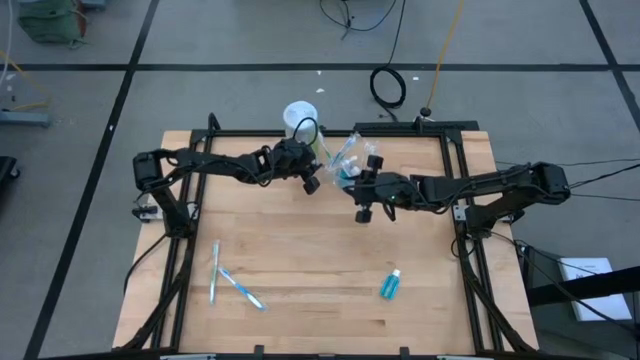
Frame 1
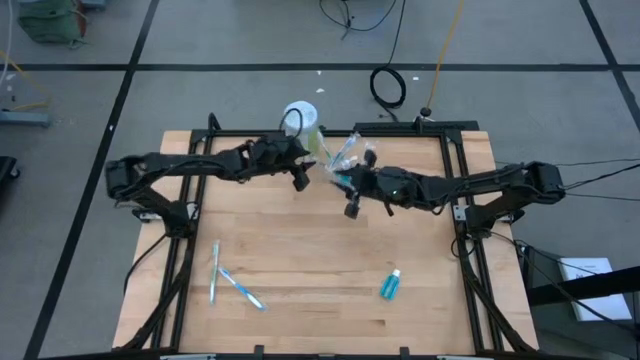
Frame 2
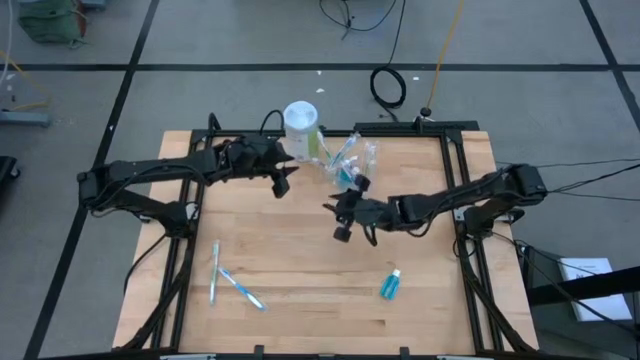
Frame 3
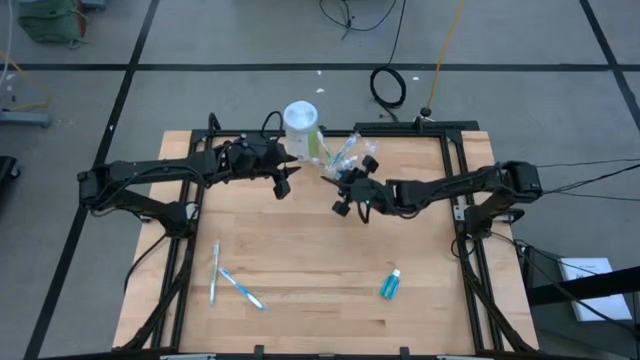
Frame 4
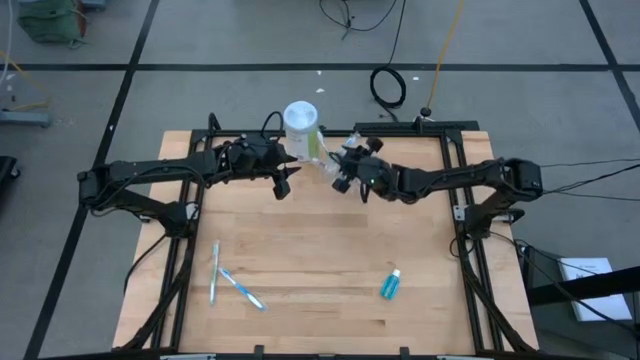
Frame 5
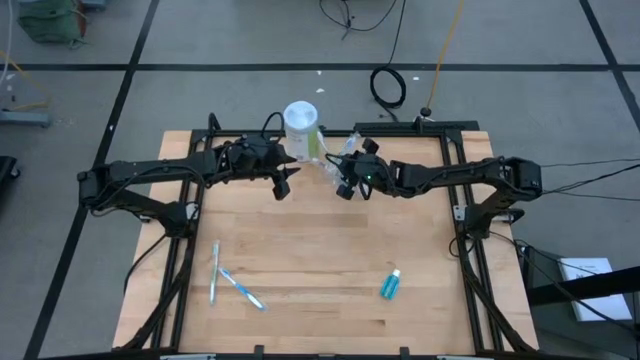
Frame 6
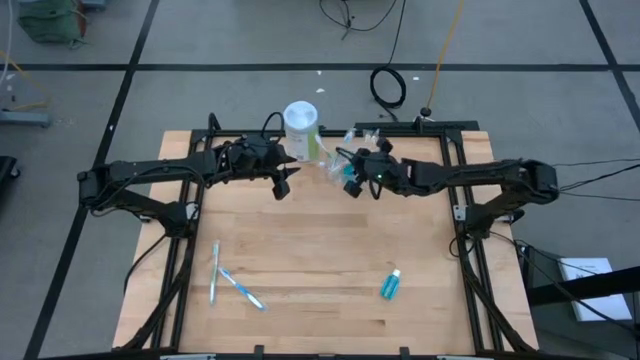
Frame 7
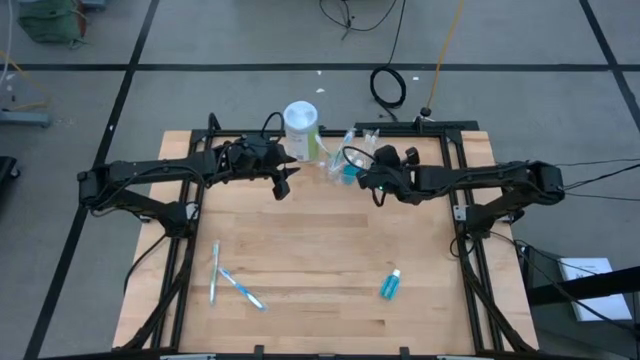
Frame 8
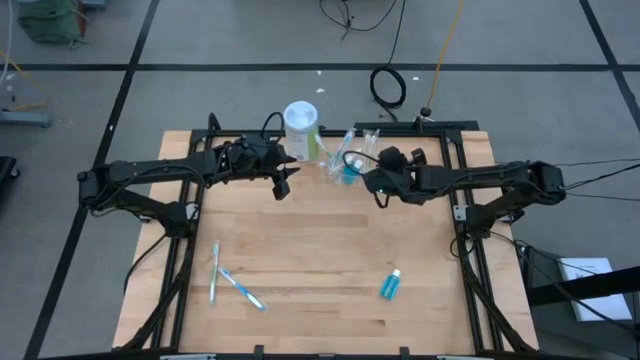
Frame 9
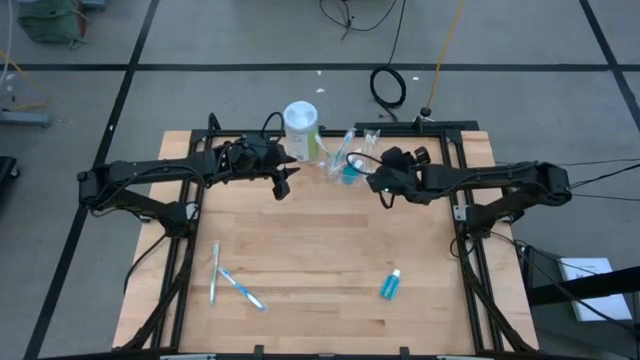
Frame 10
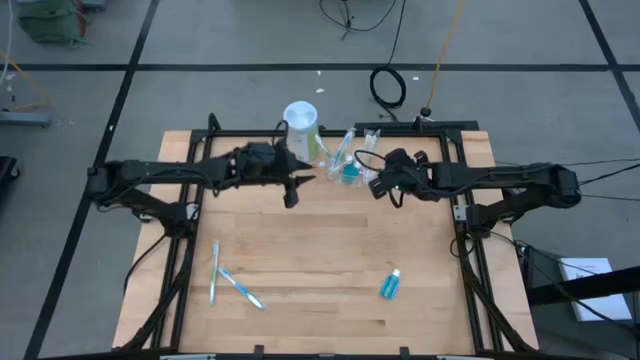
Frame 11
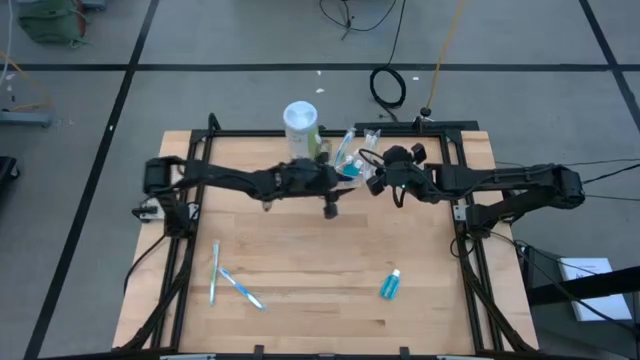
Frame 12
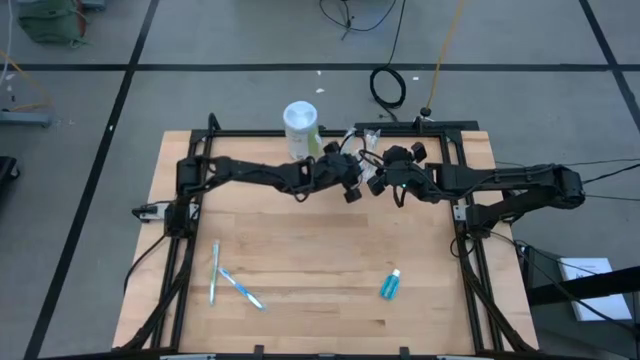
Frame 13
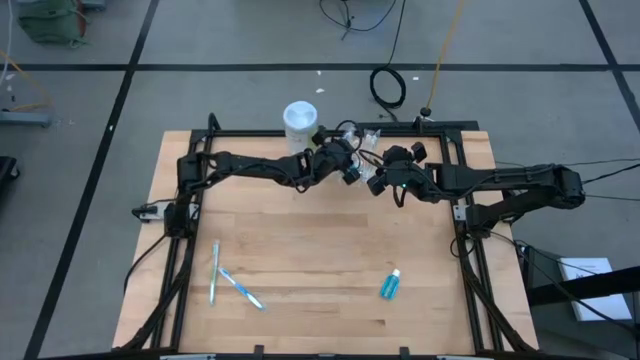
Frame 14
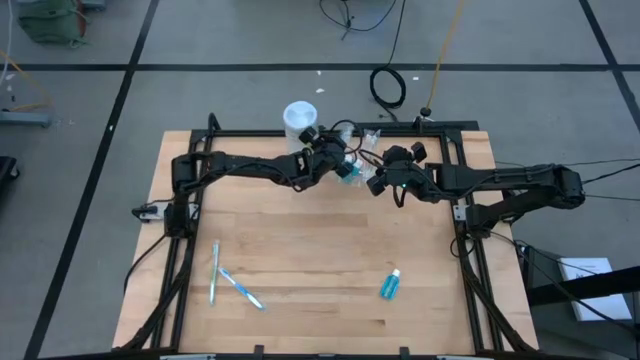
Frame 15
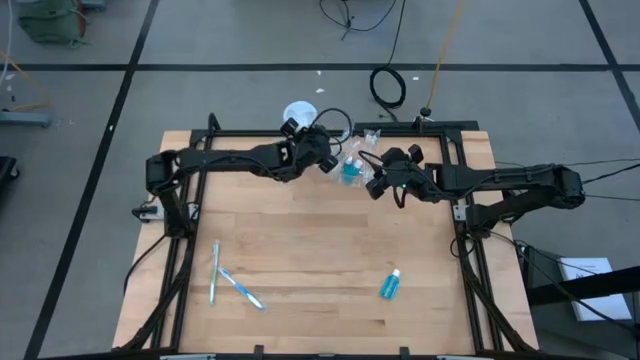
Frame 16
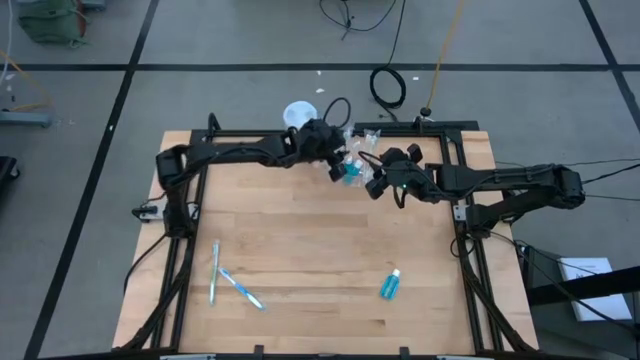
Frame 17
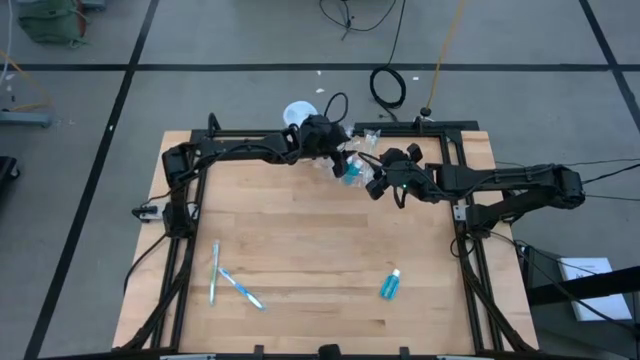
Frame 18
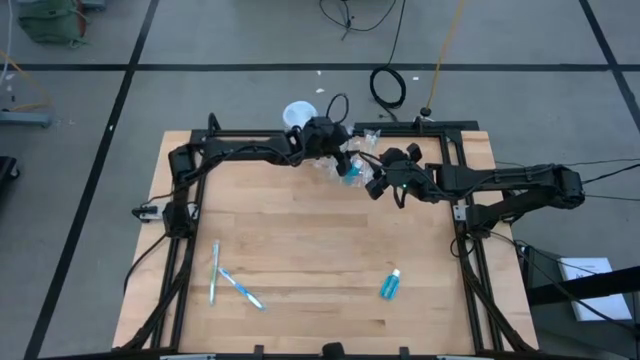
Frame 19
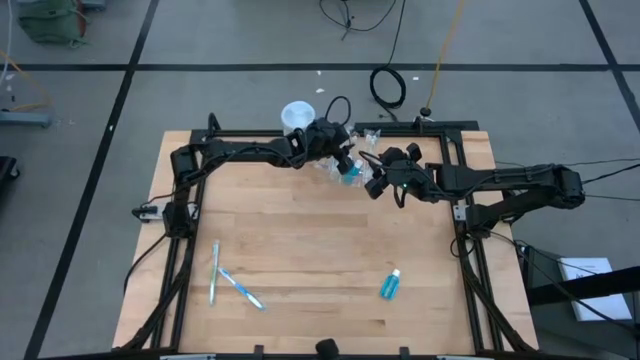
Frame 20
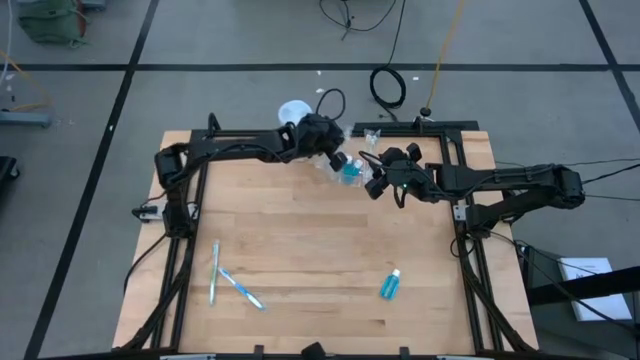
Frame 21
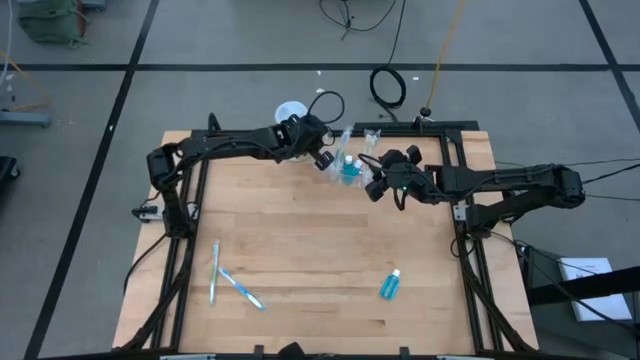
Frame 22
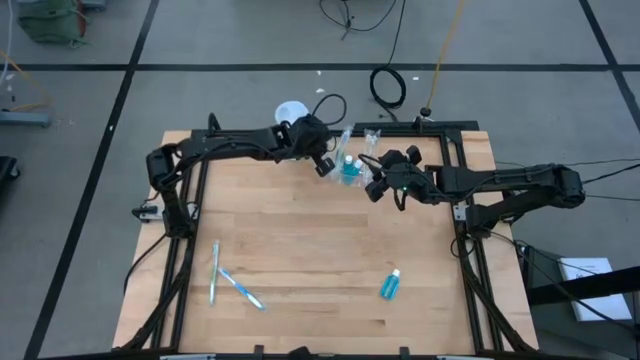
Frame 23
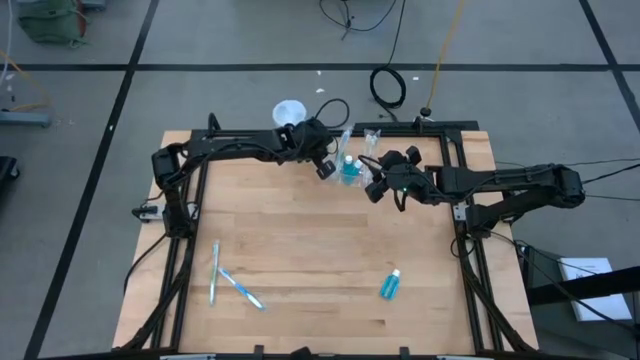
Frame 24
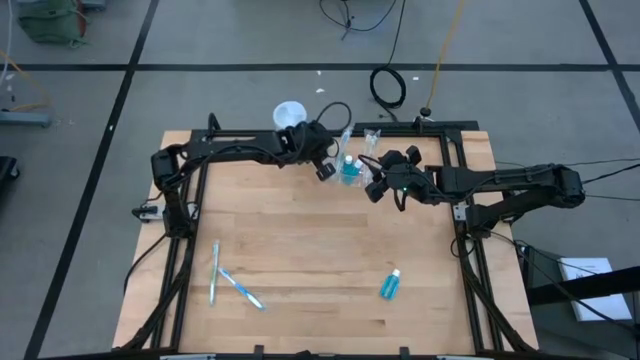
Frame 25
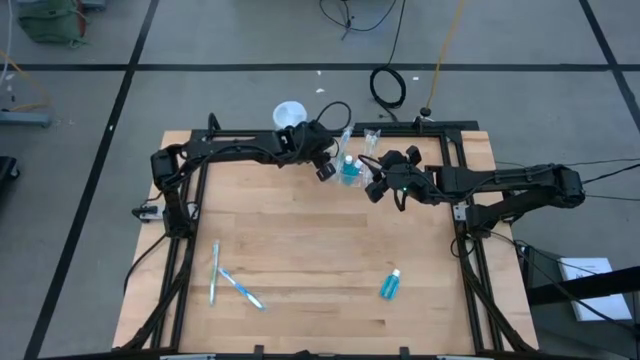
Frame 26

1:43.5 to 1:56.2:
Task: Pick & Place toothbrushing station
Adjust the toothbrushes in the transparent organizer

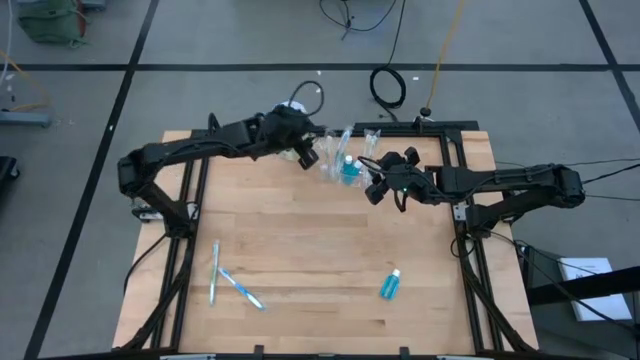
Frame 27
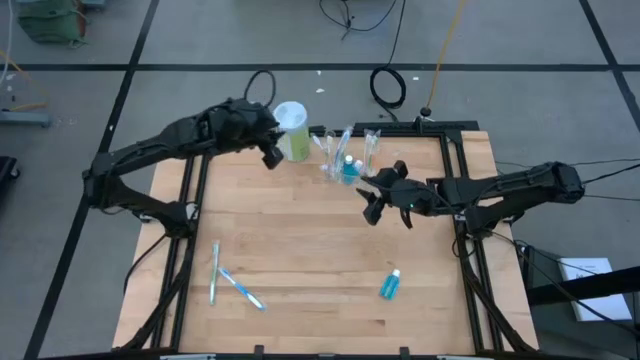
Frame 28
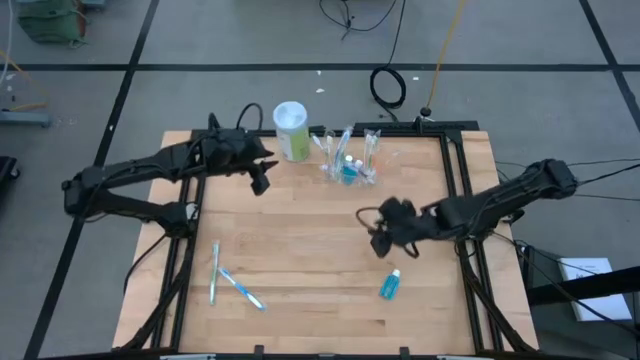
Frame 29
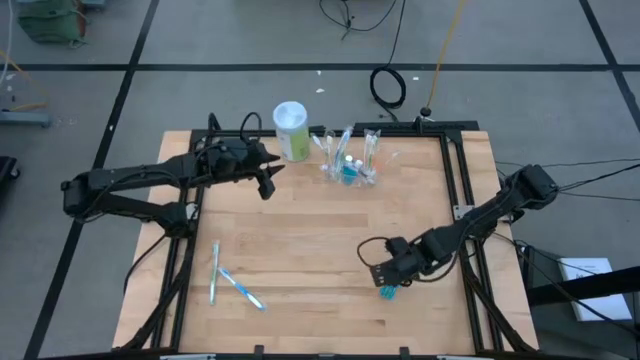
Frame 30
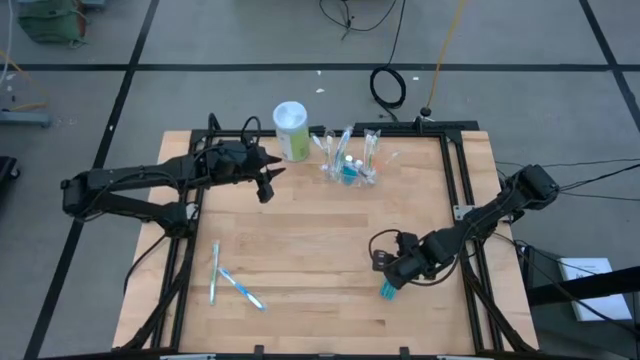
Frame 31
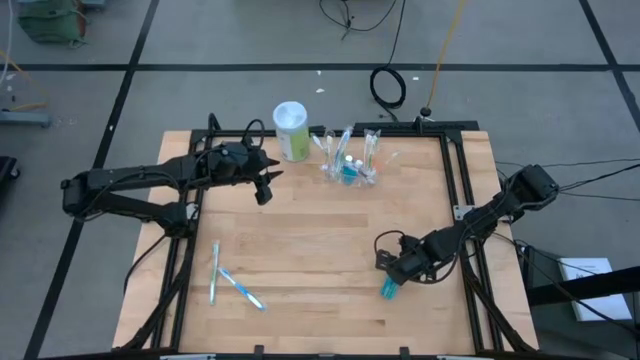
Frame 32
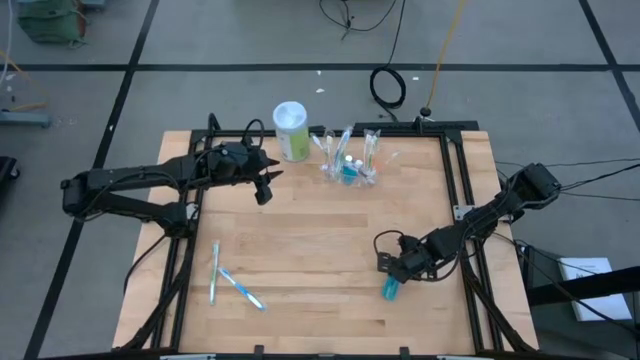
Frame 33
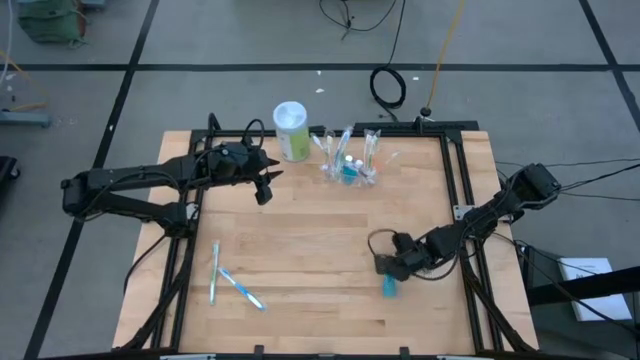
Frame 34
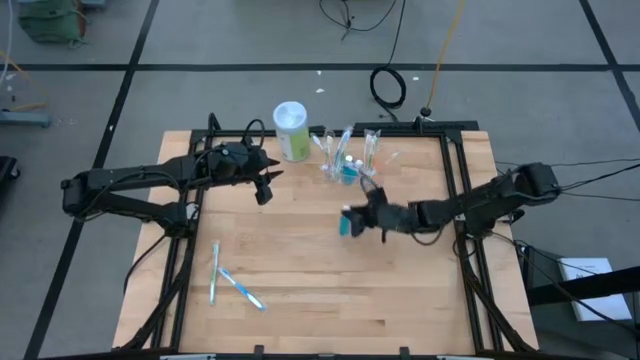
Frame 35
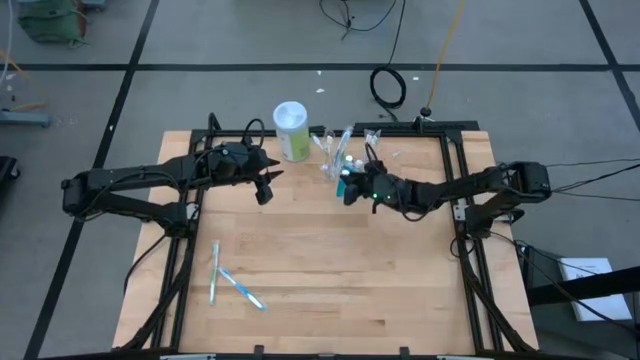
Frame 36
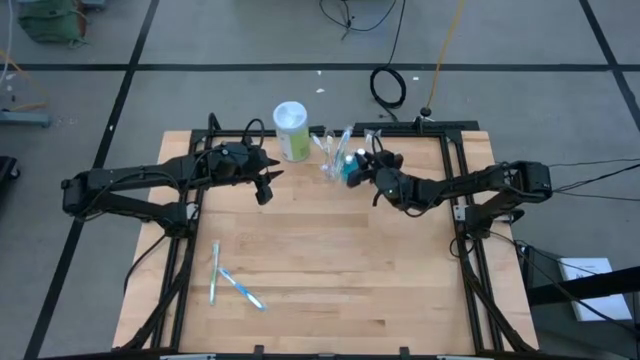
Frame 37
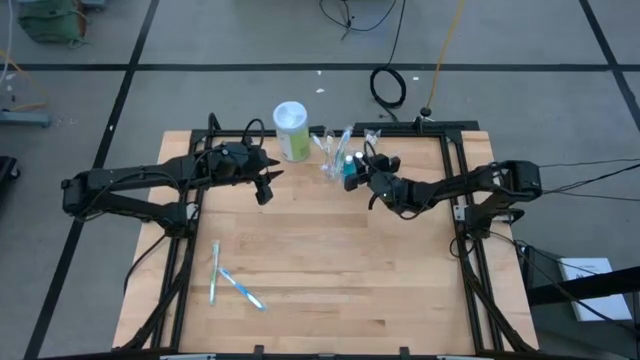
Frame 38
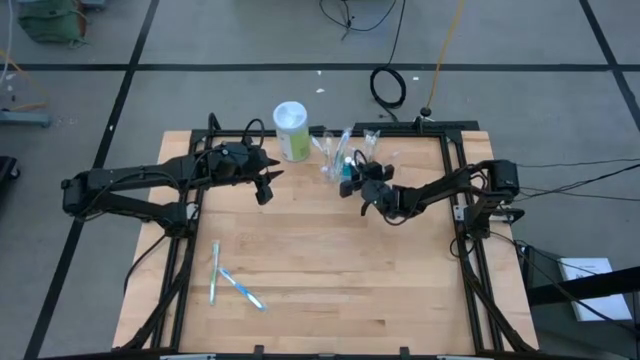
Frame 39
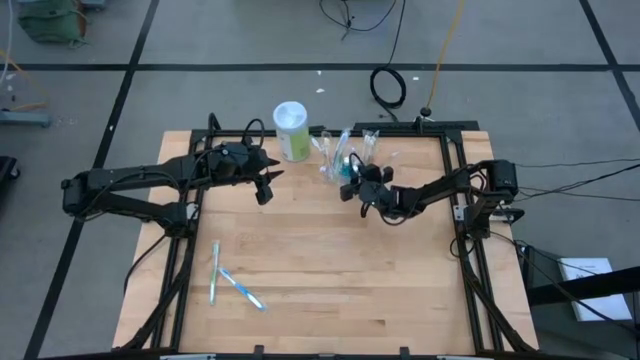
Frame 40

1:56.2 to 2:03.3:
Put the blue mouthwash into the transparent organizer

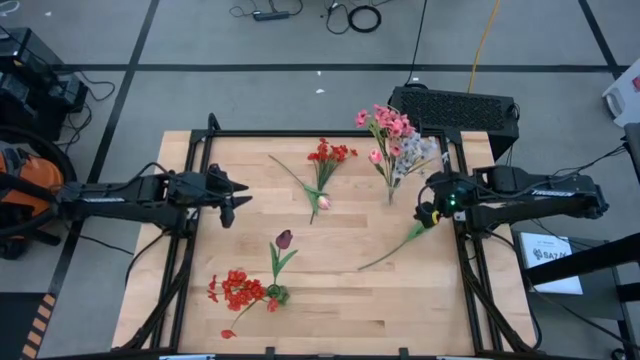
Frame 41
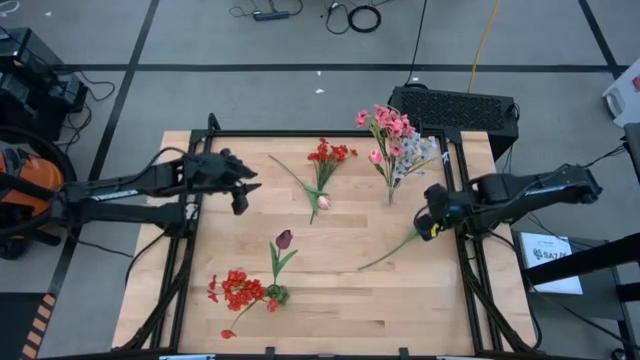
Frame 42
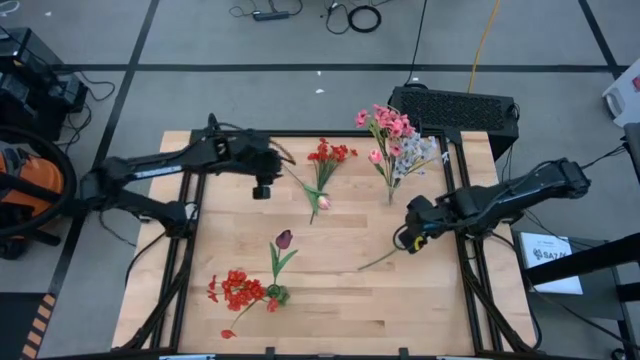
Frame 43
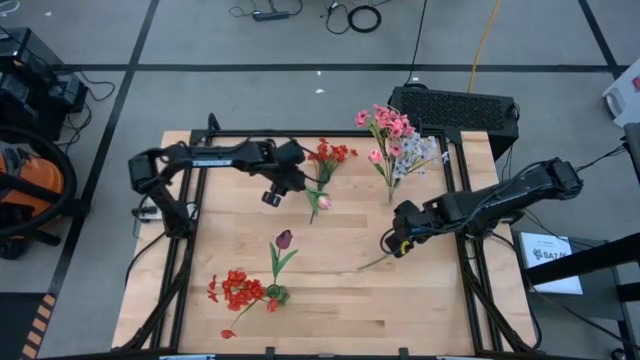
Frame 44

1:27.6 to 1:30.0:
Task: Sort flowers into vase by color
Put the pink flower into the transparent vase

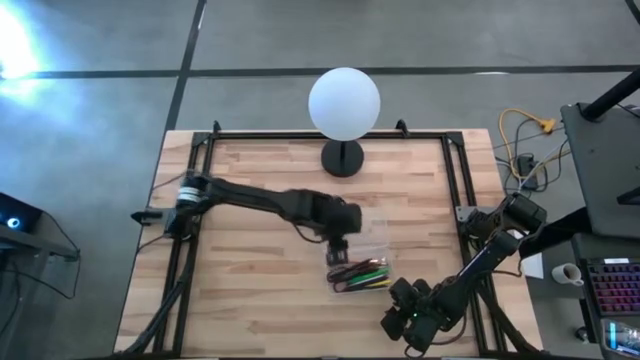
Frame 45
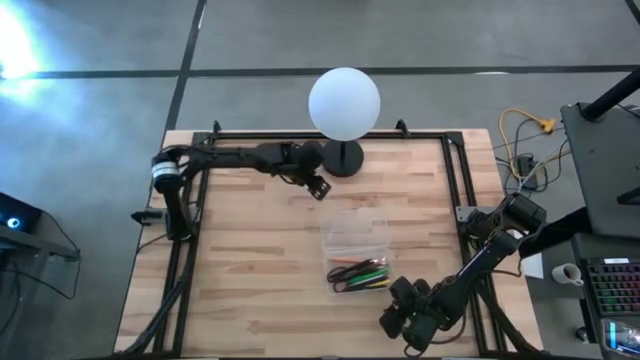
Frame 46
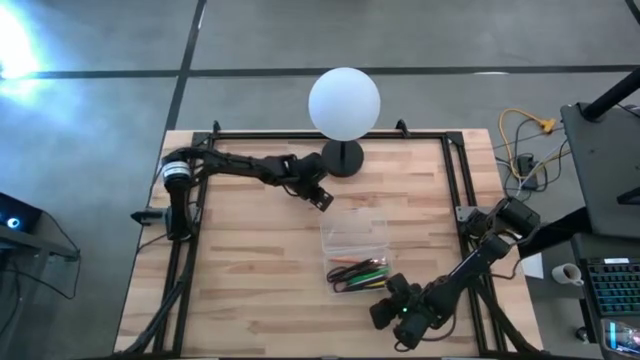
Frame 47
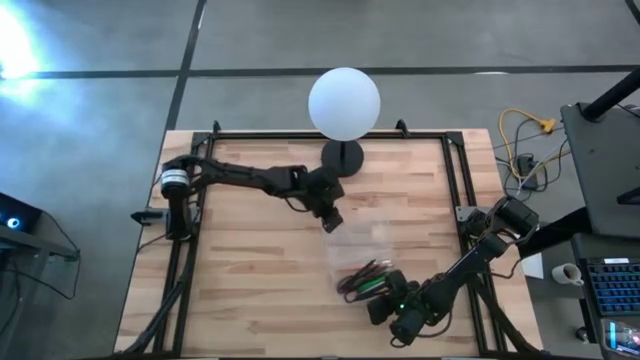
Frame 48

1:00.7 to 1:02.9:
Task: Pick & place school supplies into a supply box
Close the transparent supply box
